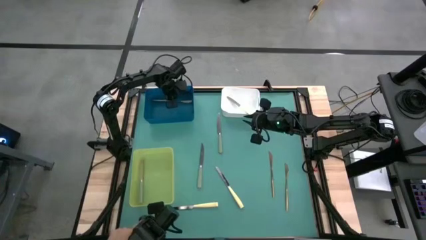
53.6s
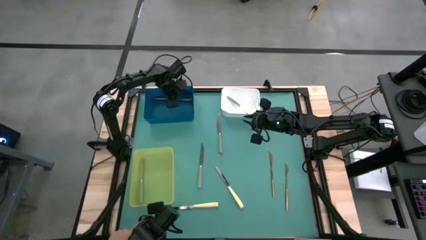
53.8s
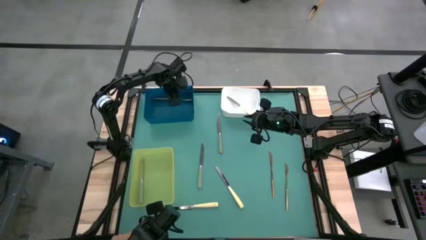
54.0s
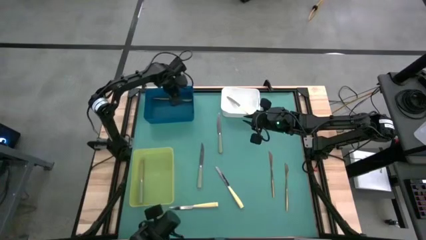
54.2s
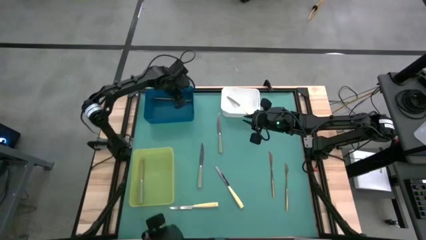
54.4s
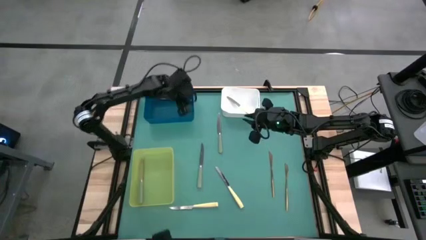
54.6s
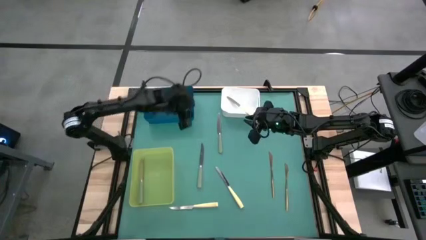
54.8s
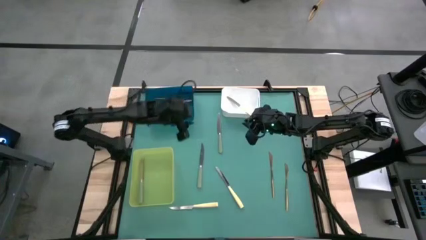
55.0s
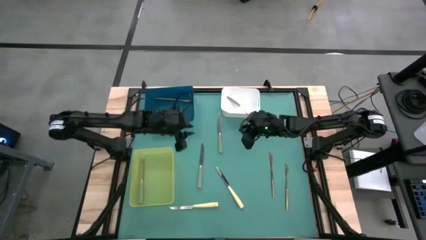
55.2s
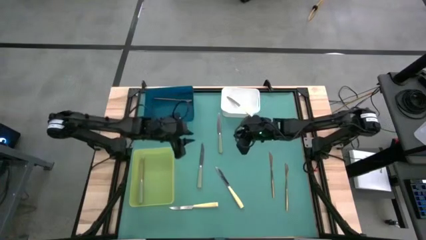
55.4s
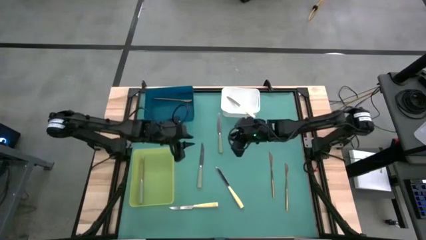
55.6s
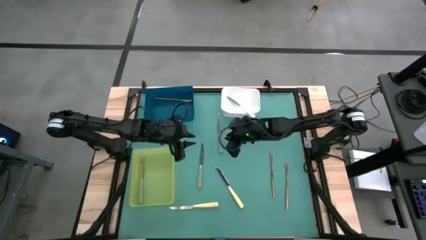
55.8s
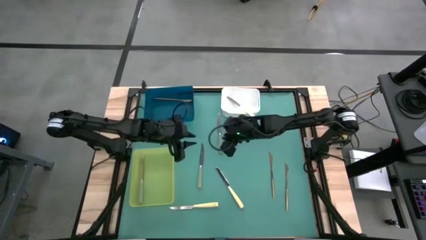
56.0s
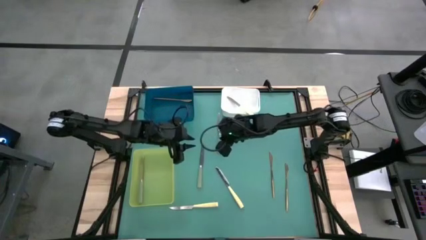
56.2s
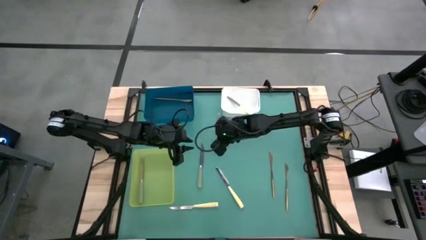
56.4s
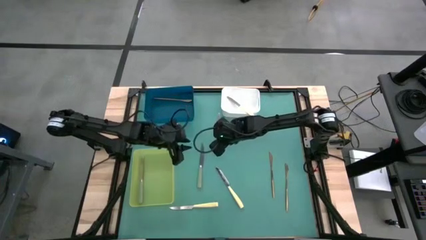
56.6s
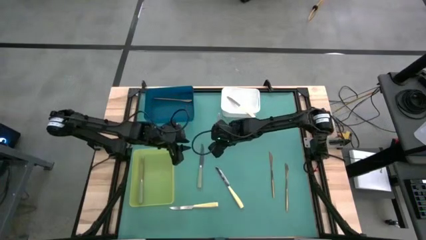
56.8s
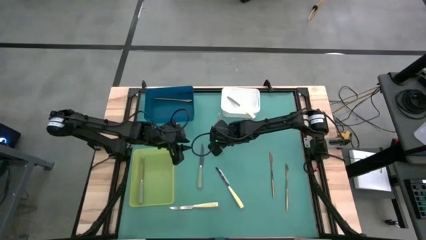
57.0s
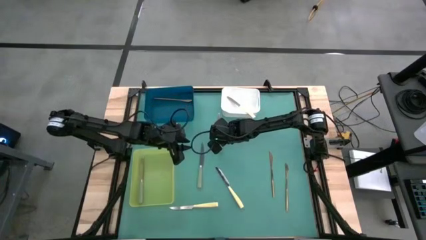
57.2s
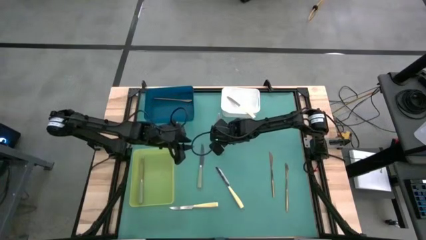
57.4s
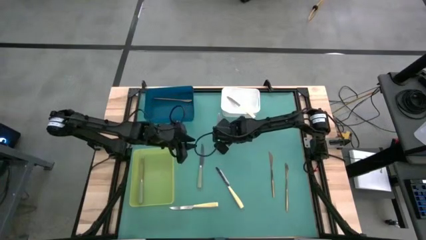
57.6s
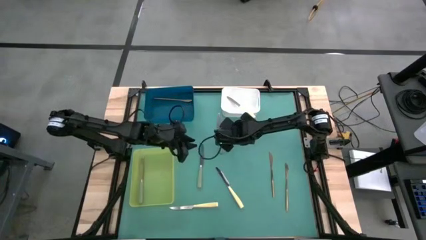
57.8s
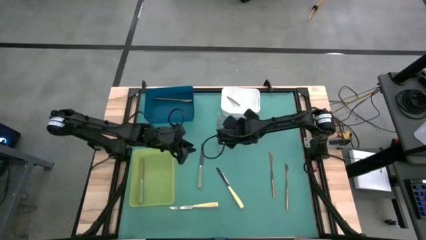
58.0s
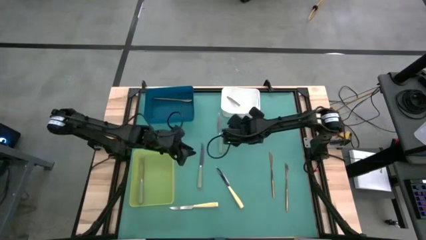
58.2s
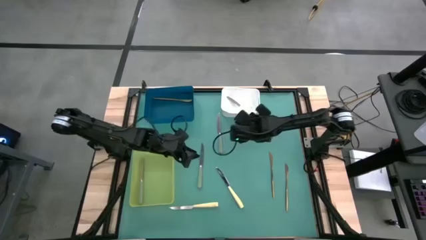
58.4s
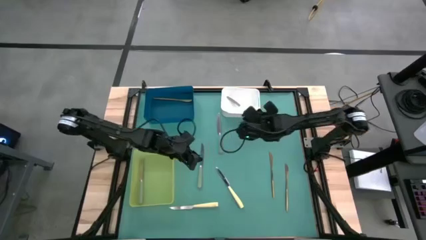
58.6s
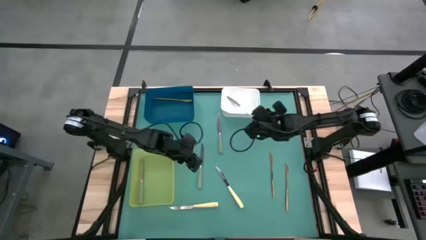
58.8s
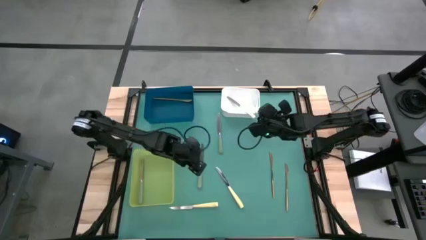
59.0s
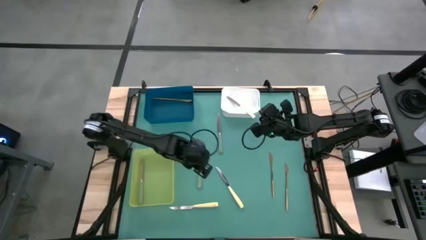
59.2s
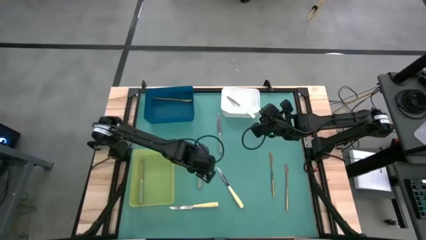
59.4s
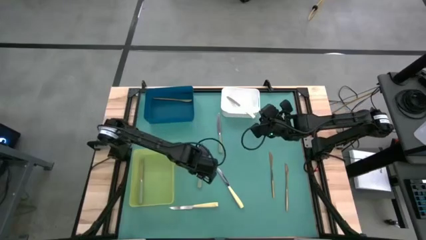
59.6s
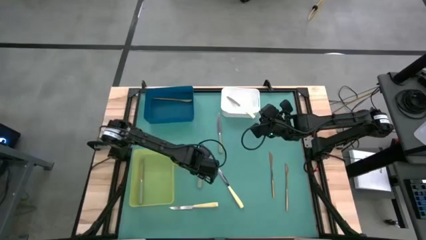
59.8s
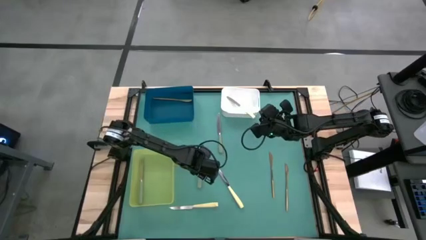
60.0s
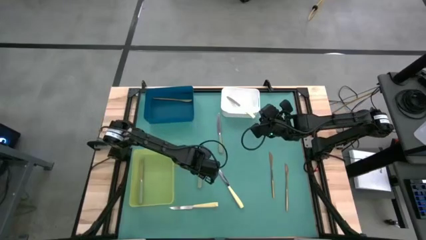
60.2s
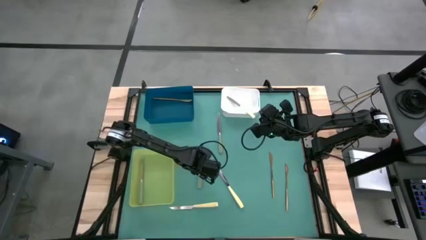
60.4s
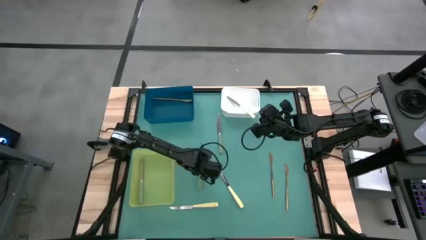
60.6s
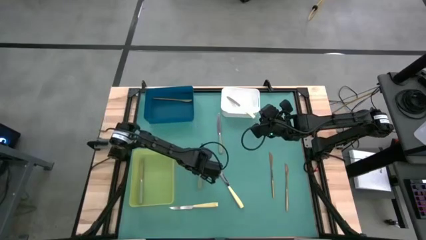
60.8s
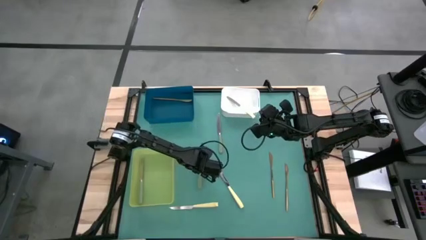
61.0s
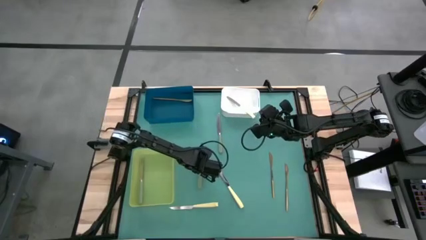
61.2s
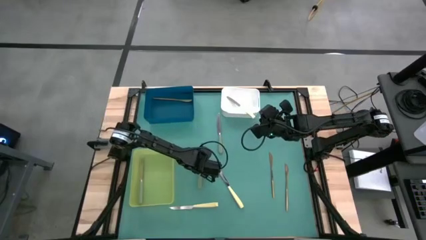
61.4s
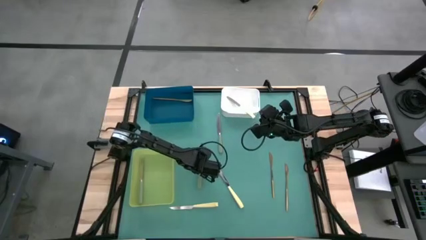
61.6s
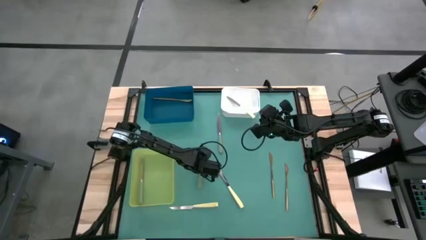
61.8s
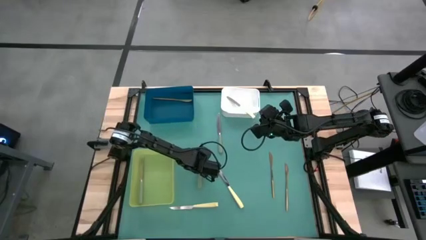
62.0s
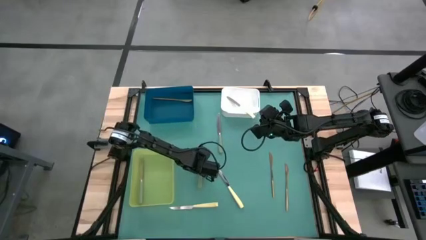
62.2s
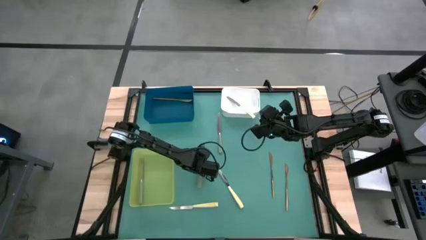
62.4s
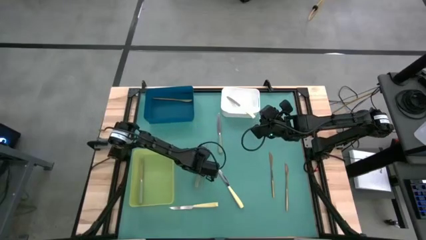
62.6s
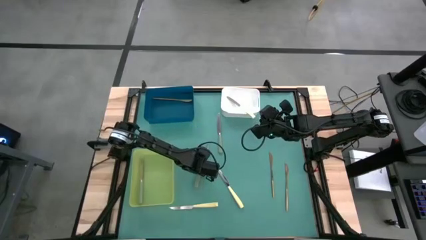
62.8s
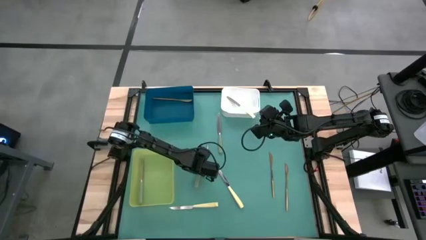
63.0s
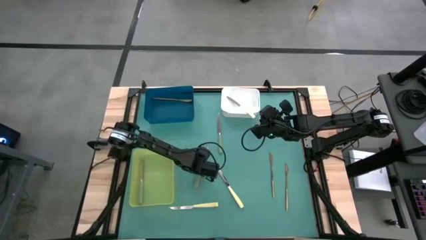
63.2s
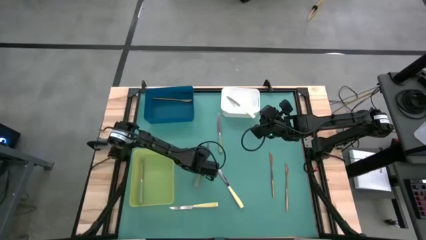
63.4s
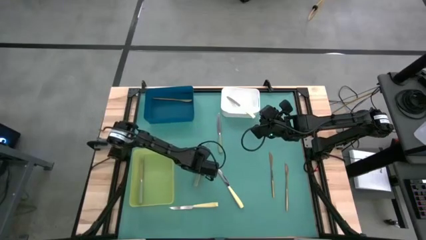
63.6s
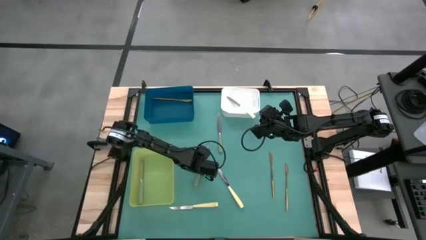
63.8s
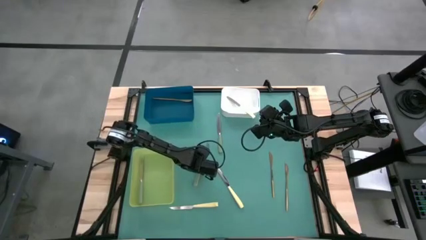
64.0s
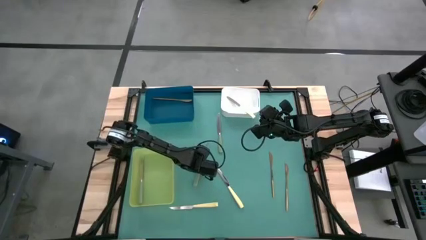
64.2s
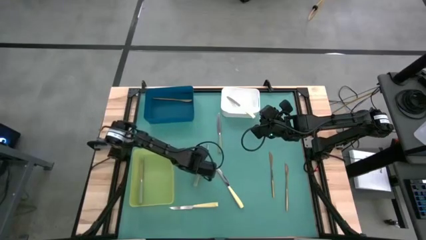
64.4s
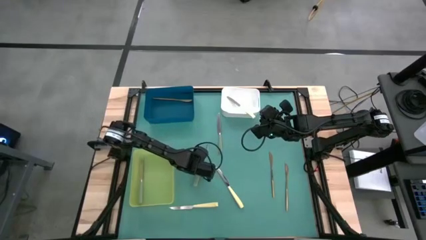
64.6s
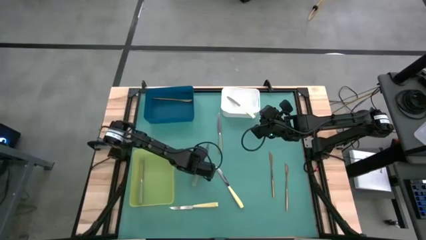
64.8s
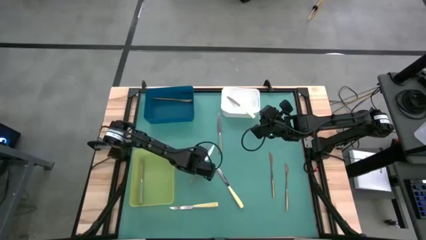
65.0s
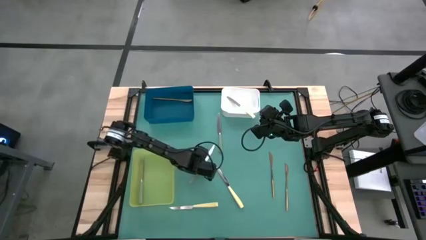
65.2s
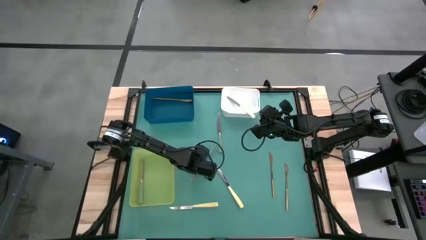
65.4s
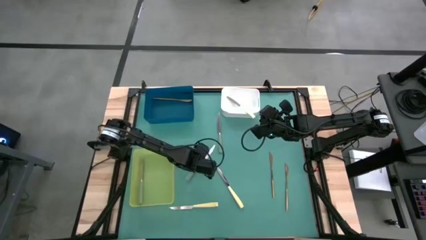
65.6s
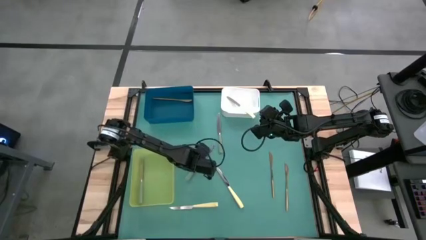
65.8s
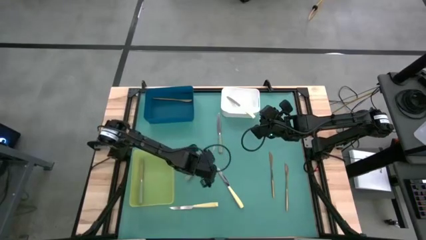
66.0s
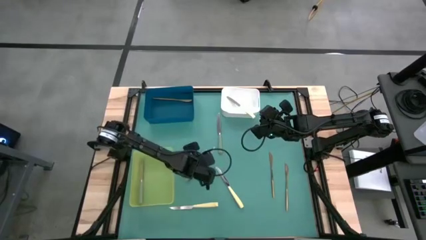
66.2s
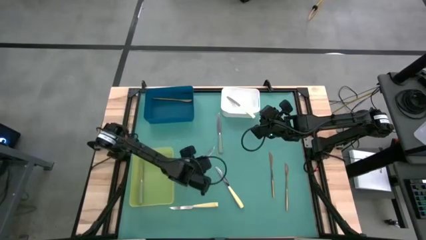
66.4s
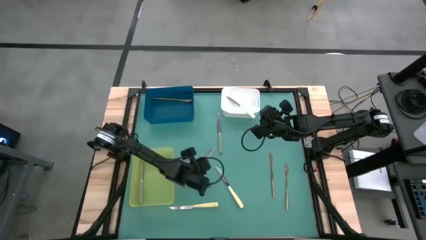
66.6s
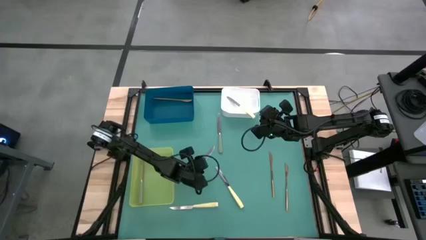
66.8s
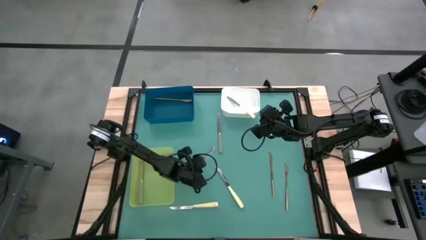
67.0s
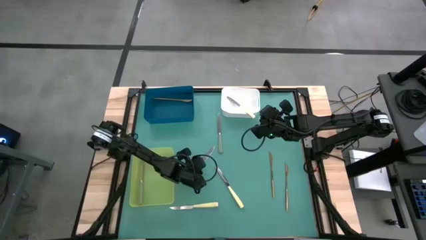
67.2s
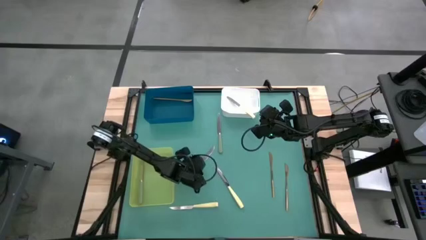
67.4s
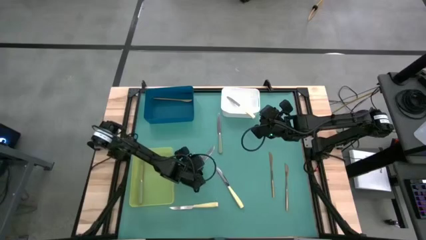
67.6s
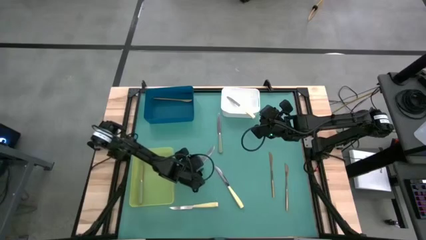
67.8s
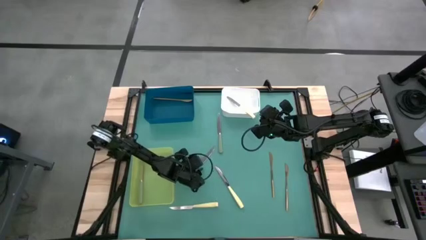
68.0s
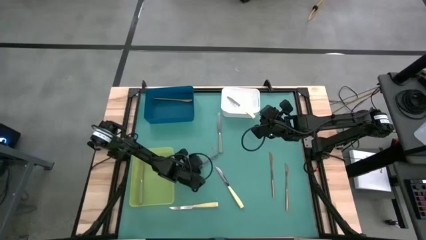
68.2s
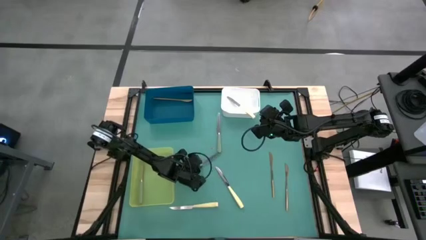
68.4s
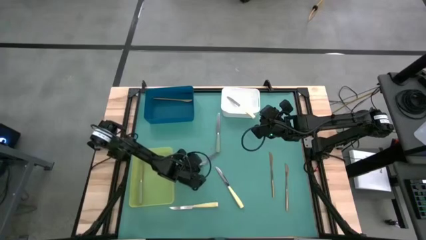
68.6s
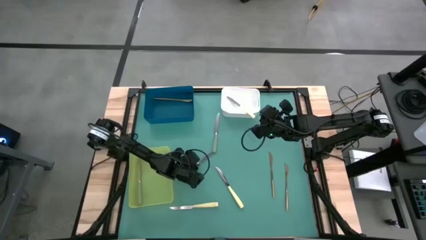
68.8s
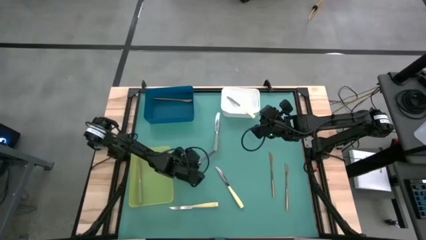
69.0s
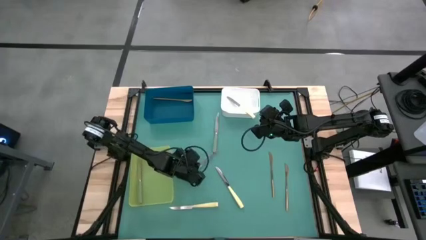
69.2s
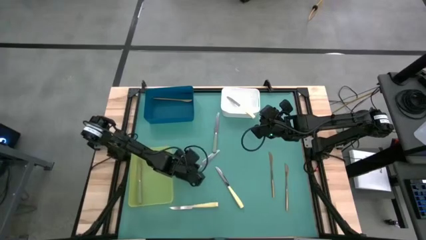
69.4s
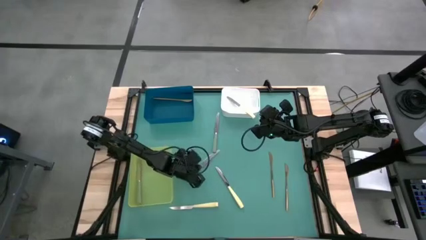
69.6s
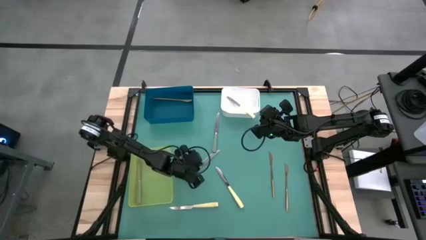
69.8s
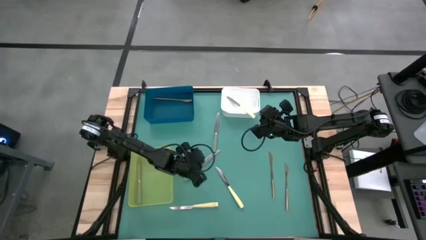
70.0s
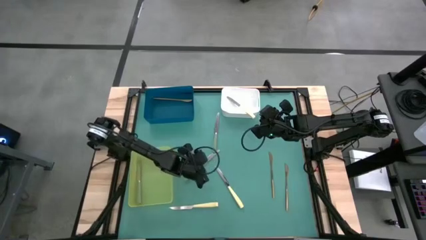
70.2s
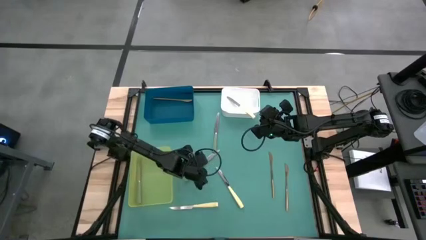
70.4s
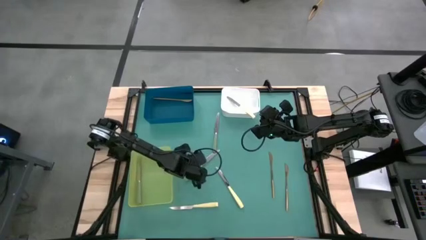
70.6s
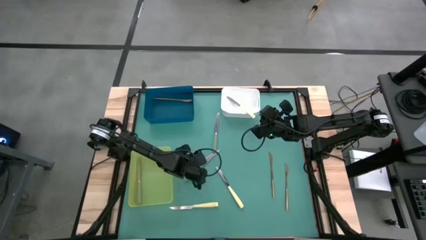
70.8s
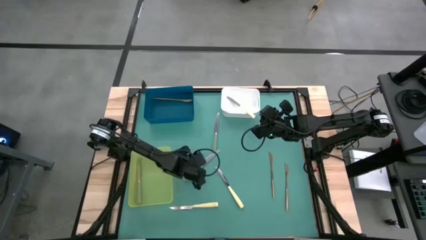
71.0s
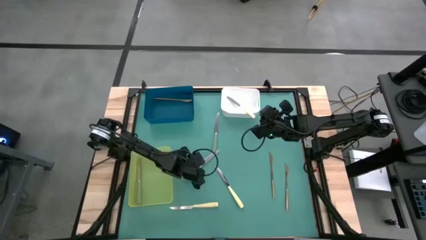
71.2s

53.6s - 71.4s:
Task: Sort silverware by color (type)
Put the bottom green knife into the green bin
